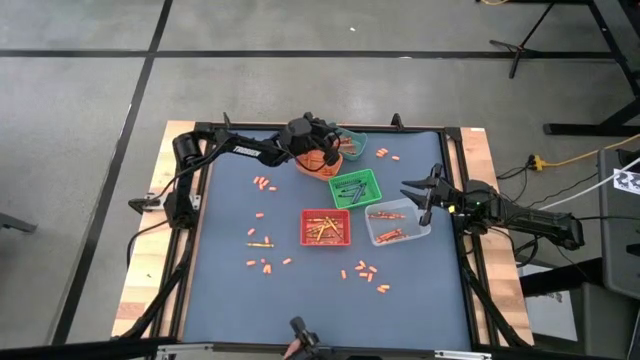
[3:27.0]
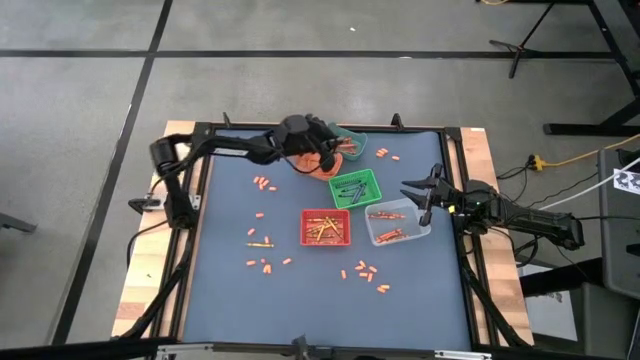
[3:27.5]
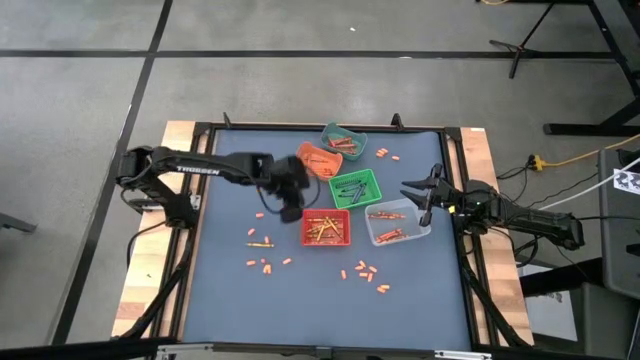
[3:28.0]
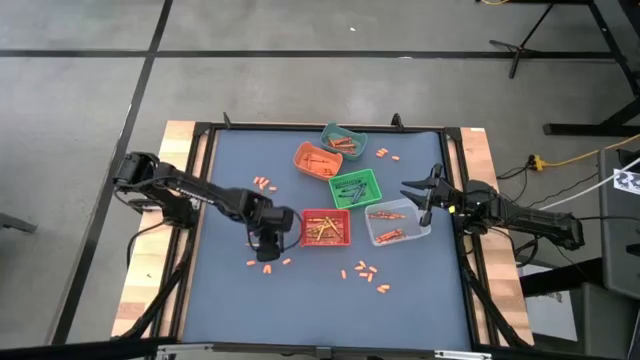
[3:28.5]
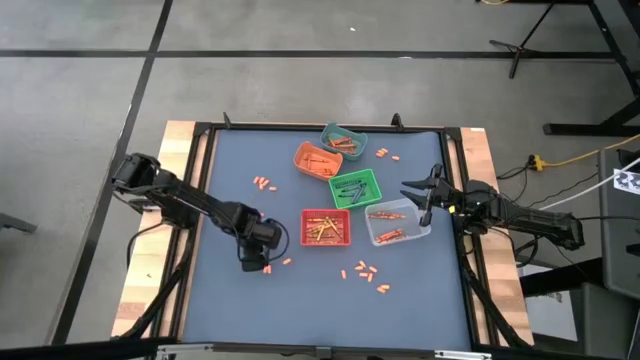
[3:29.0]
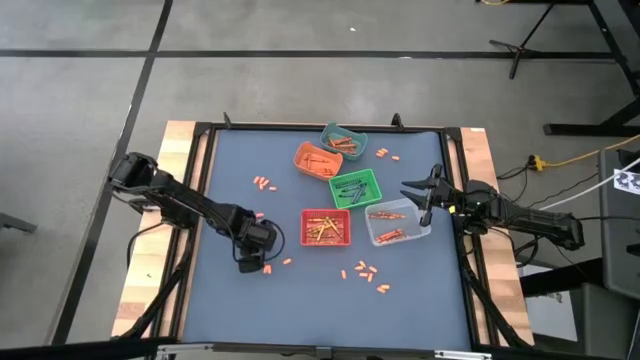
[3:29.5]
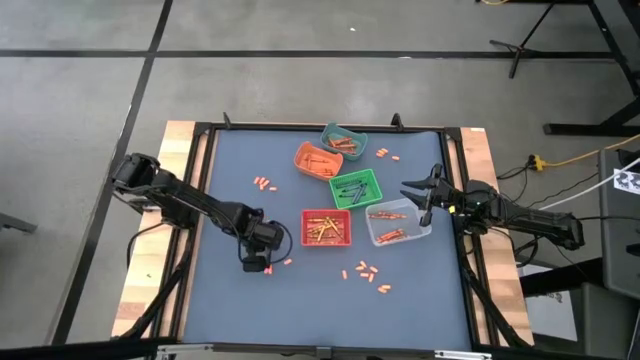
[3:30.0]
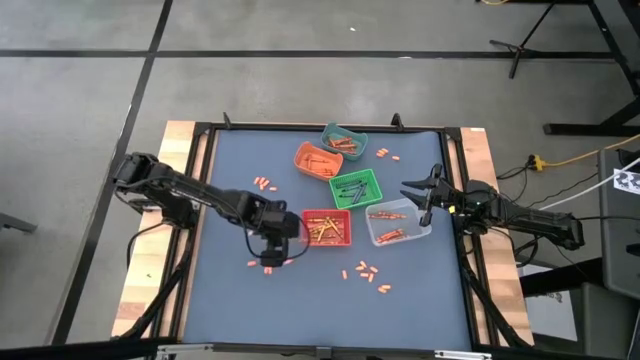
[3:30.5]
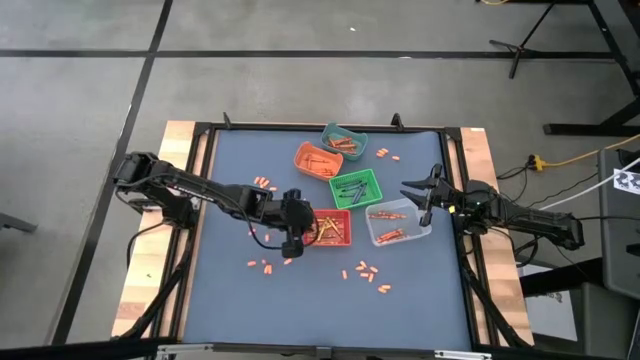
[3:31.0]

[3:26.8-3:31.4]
Task: Sort crayons
Put the yellow crayon into the red bin

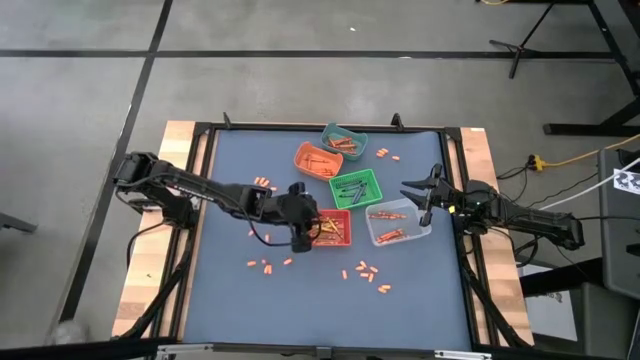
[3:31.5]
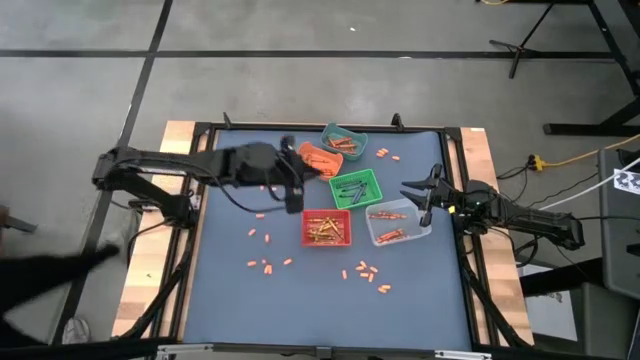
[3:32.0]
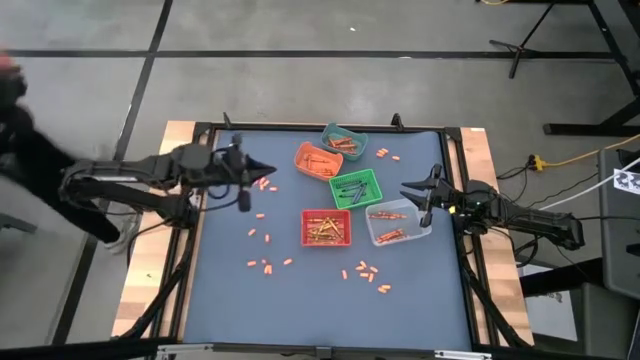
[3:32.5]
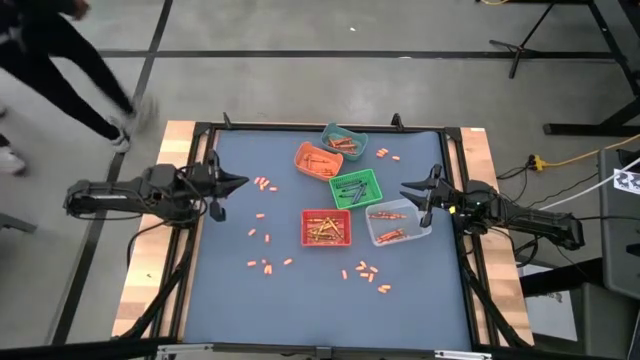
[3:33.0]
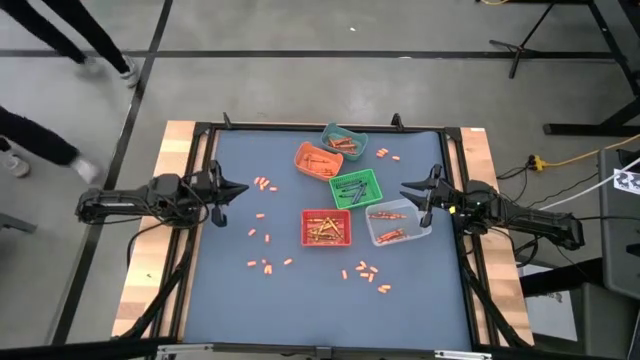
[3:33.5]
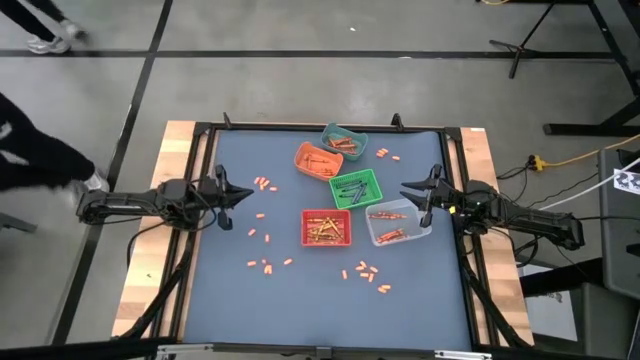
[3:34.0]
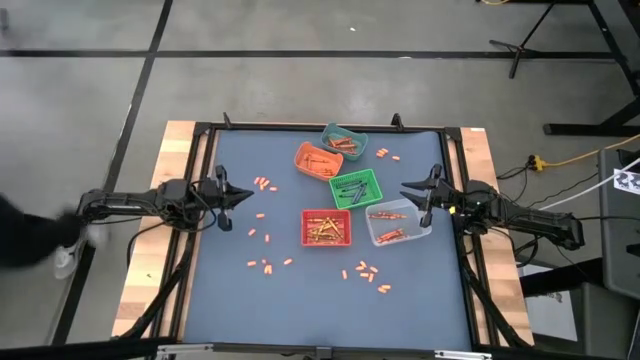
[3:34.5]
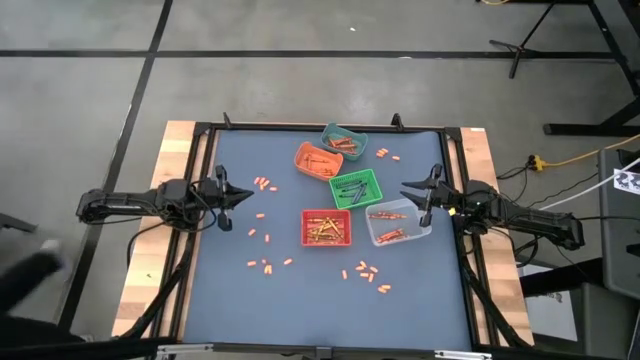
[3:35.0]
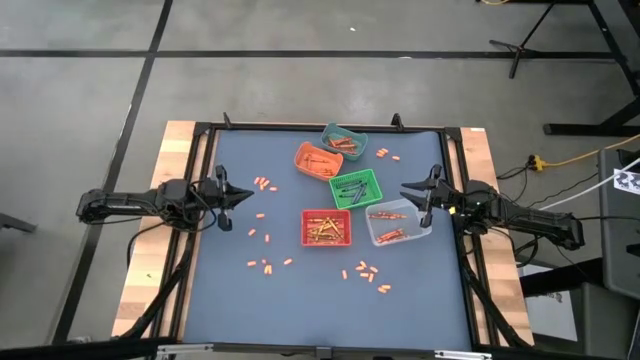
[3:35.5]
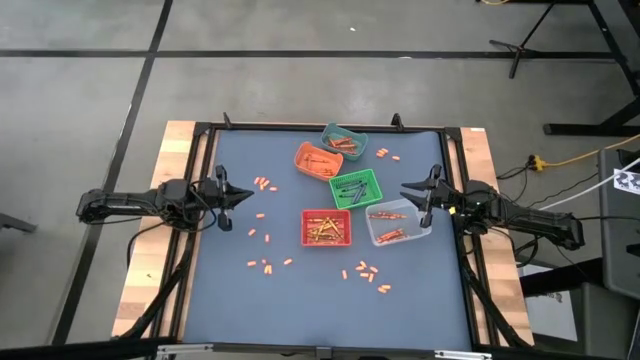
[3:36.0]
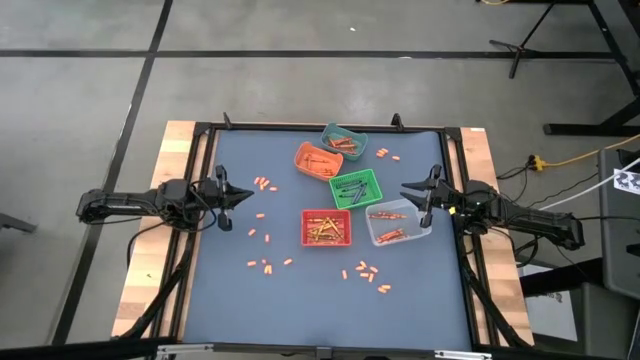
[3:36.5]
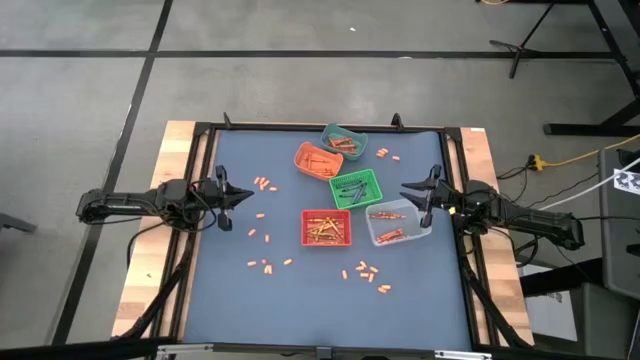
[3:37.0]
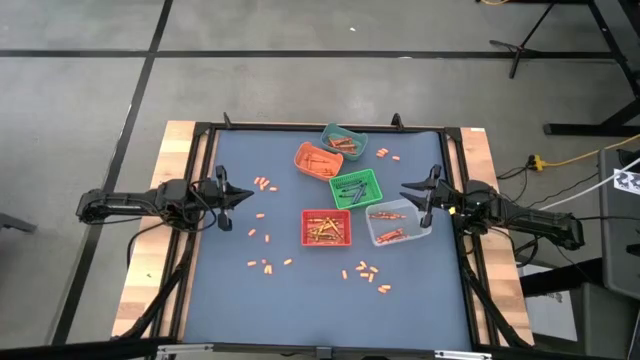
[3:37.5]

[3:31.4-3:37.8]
Return to Home Position

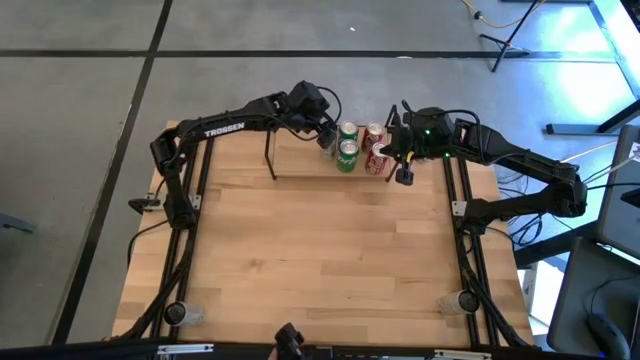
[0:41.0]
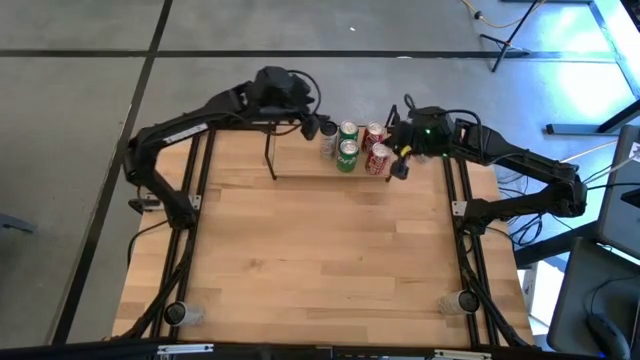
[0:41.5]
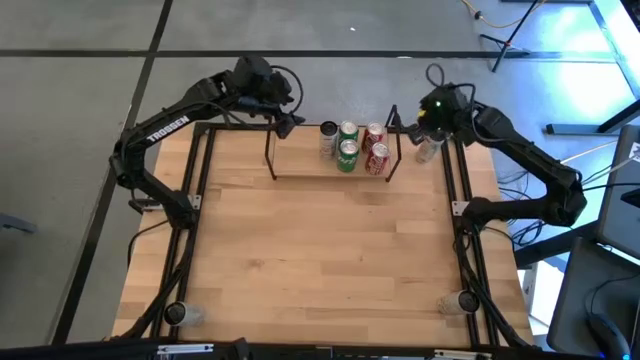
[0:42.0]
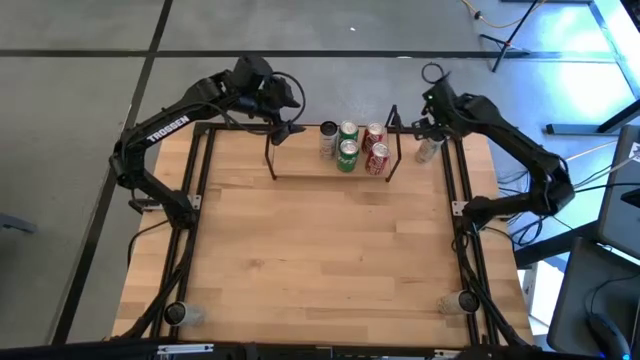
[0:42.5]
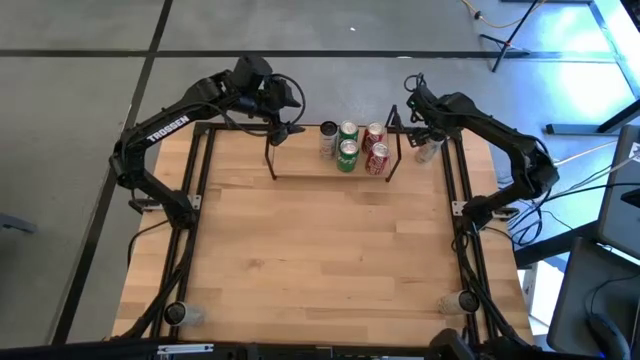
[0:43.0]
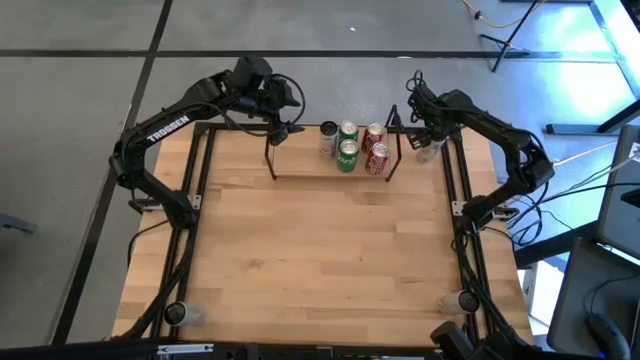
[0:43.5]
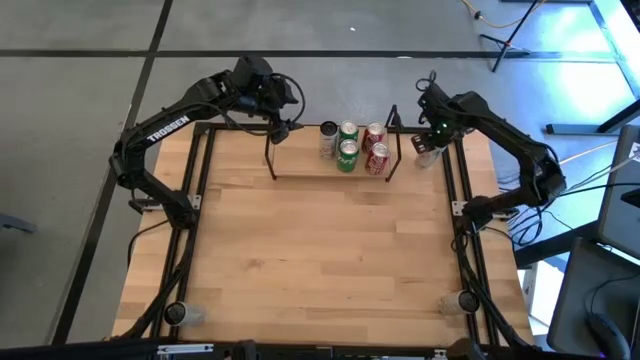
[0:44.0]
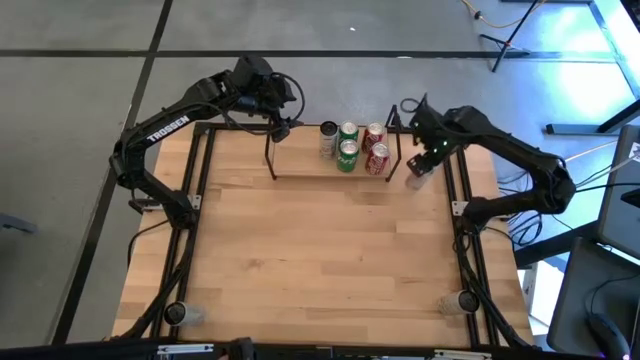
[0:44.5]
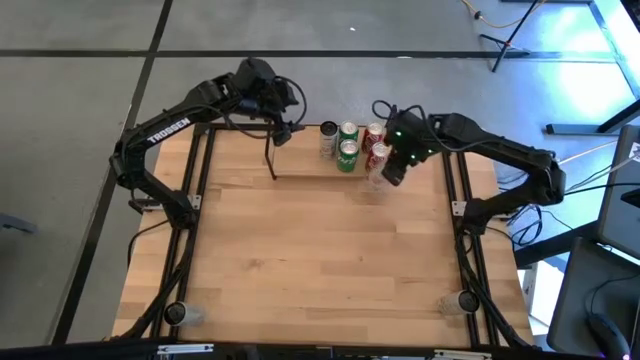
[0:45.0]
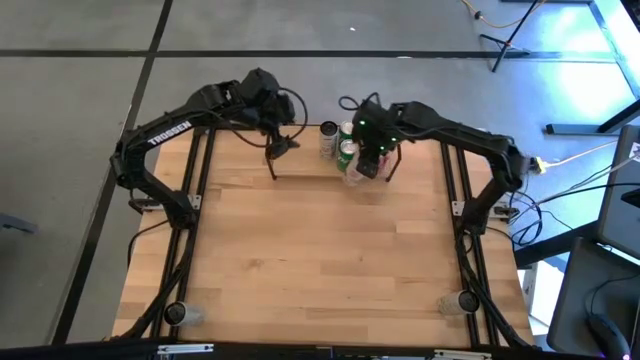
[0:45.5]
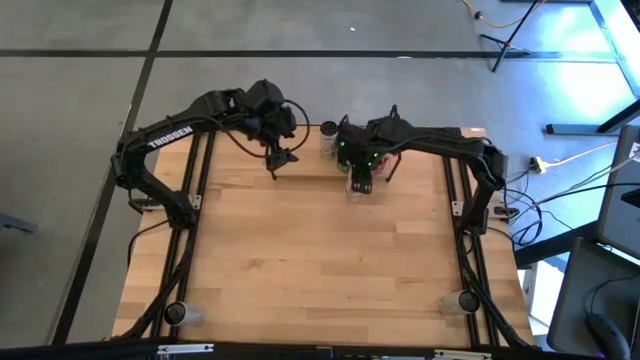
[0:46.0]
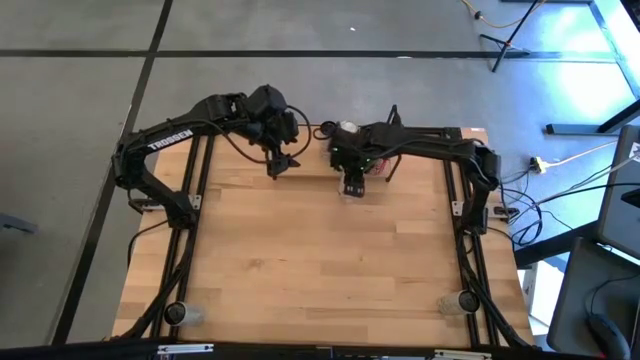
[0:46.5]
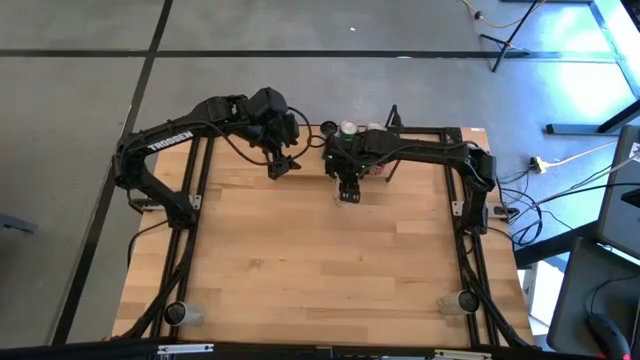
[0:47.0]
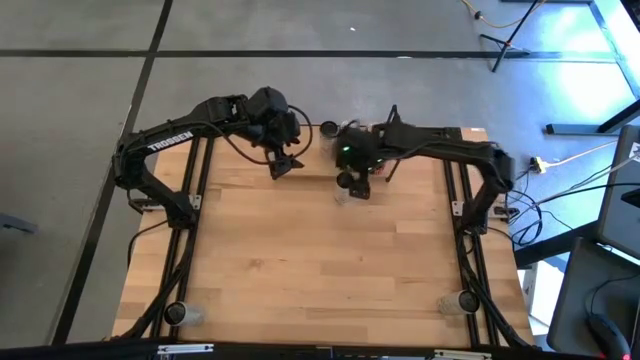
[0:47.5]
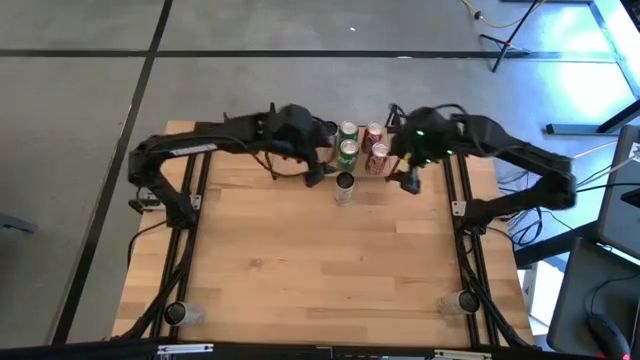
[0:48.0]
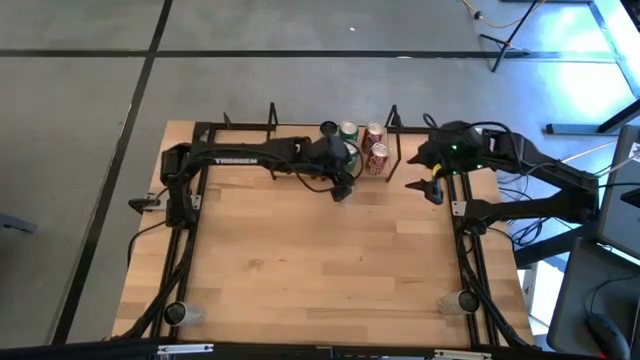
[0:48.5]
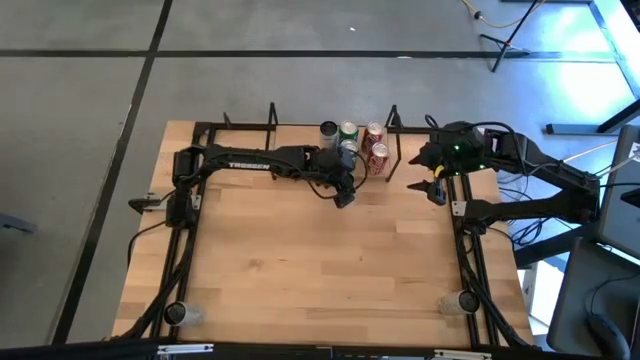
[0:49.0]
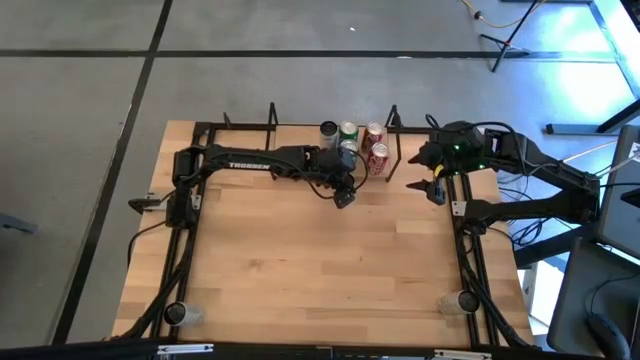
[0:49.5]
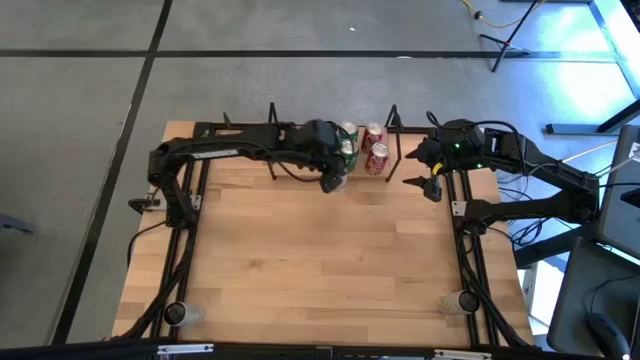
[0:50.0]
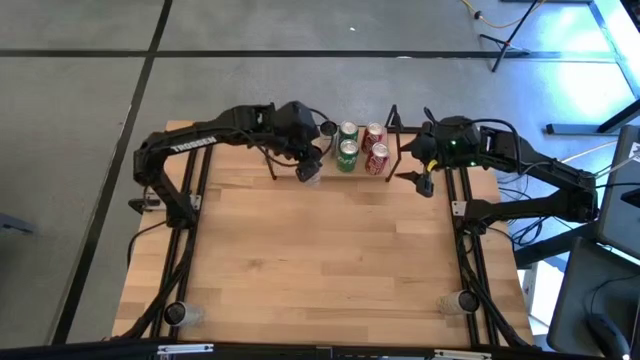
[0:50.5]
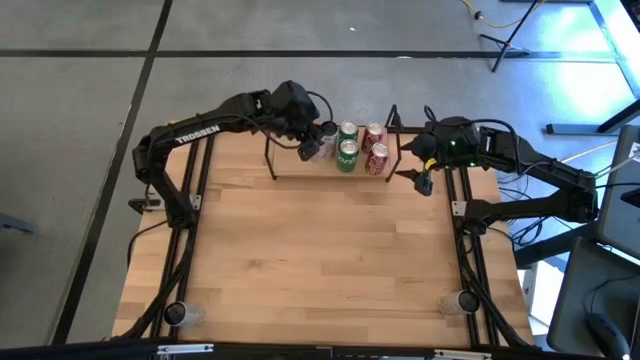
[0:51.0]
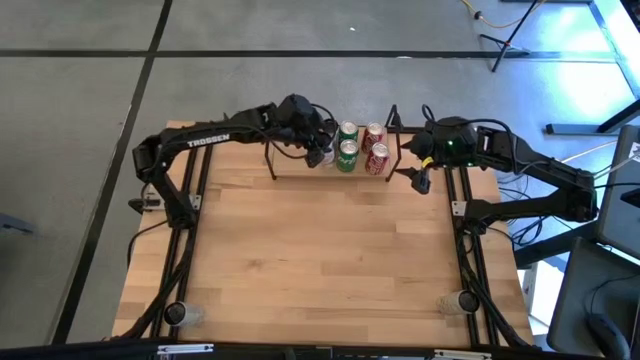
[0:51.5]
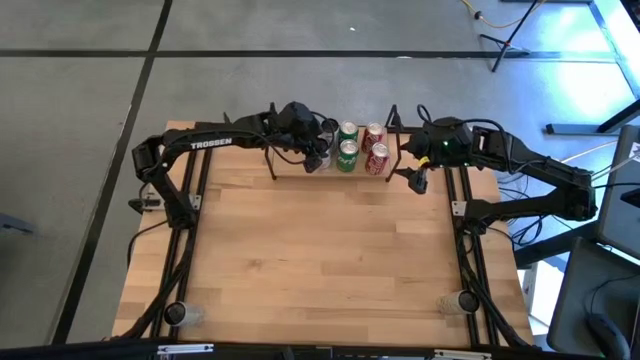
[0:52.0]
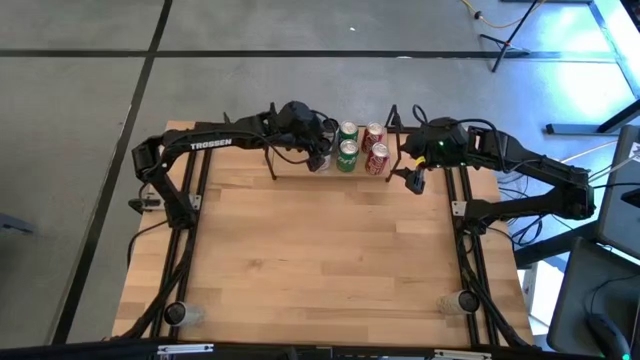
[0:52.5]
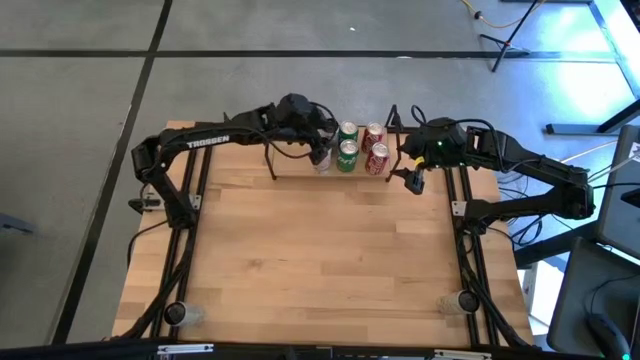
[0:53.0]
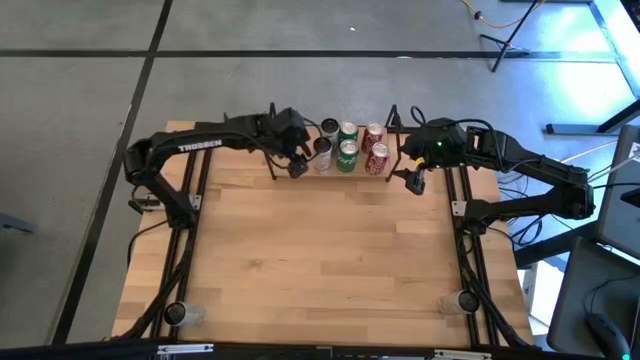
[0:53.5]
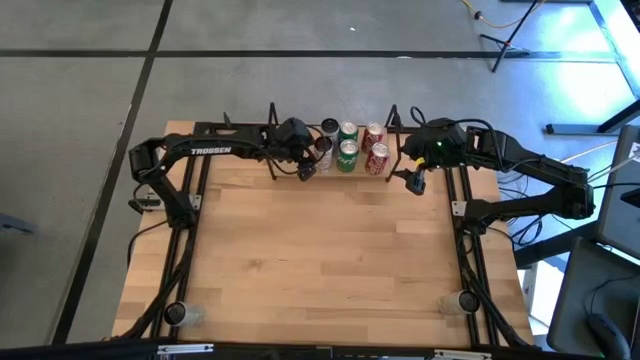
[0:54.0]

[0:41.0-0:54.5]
Task: Place canned beverage on shelf
Put the white pink soda can on the shelf aligned with the other white pink soda can
